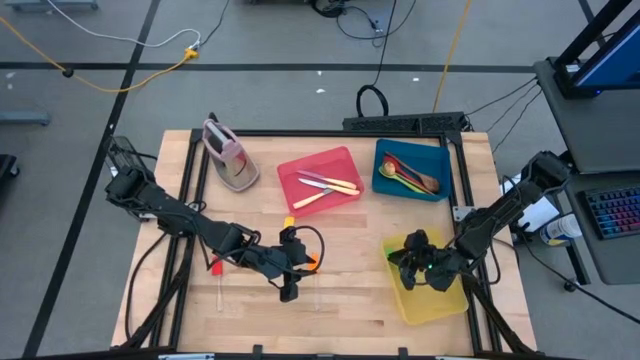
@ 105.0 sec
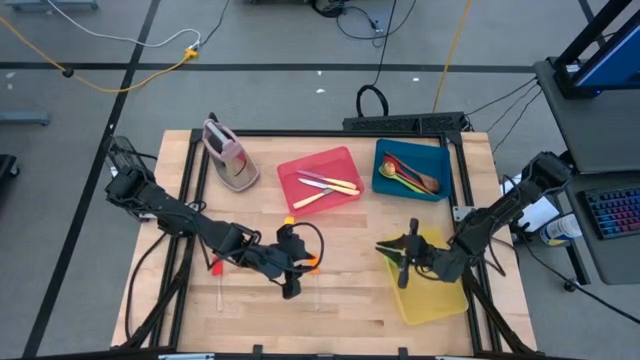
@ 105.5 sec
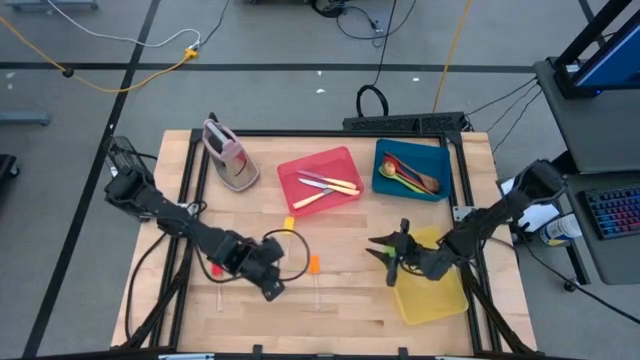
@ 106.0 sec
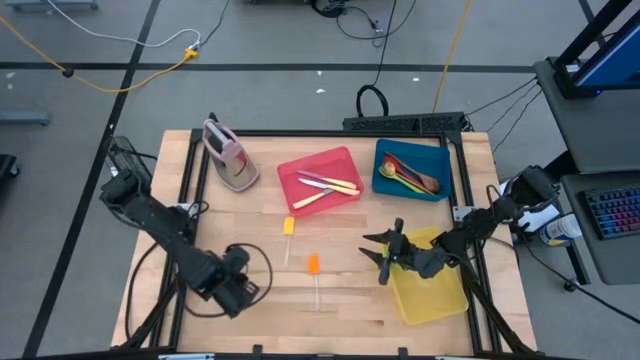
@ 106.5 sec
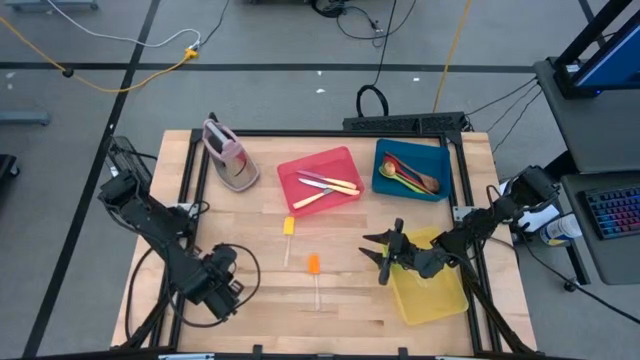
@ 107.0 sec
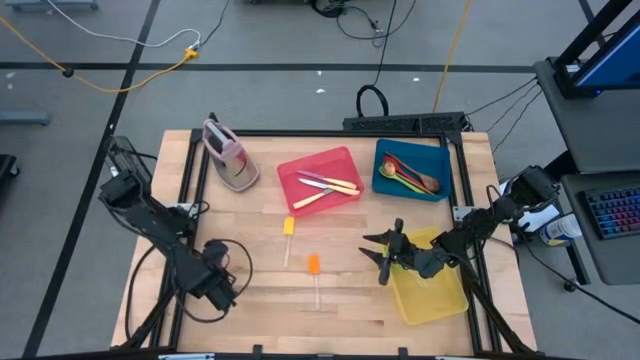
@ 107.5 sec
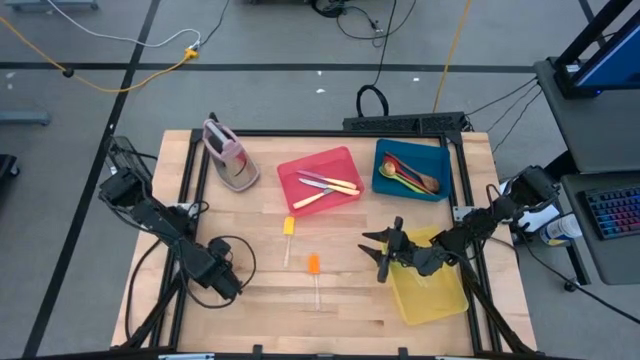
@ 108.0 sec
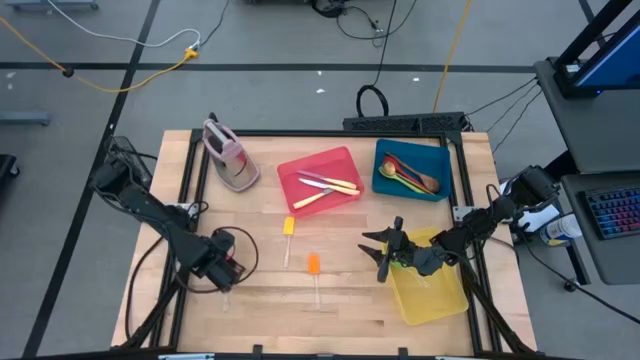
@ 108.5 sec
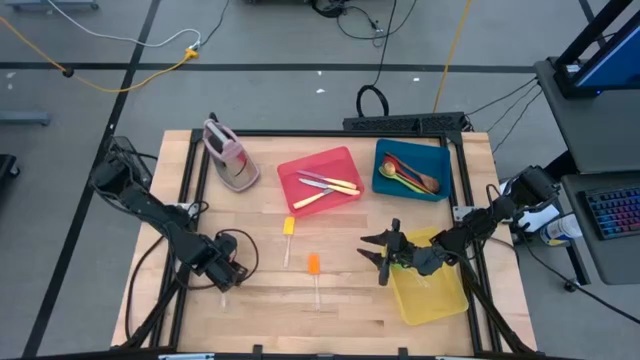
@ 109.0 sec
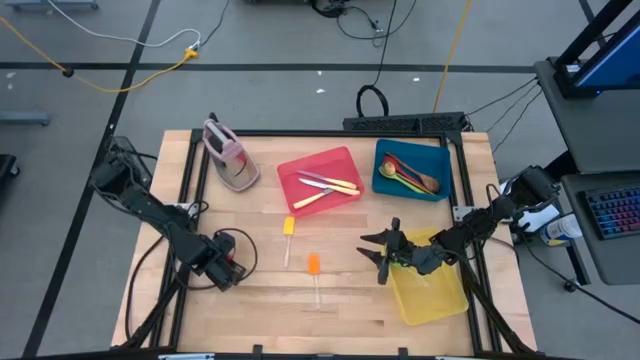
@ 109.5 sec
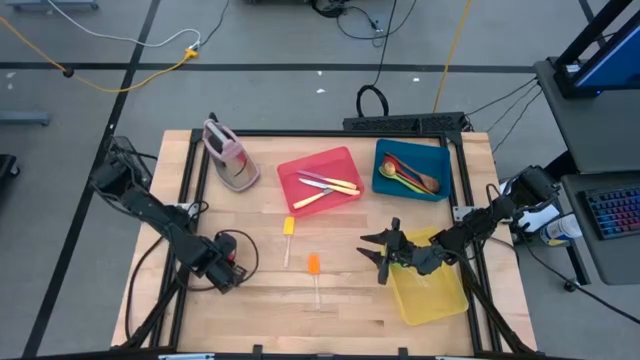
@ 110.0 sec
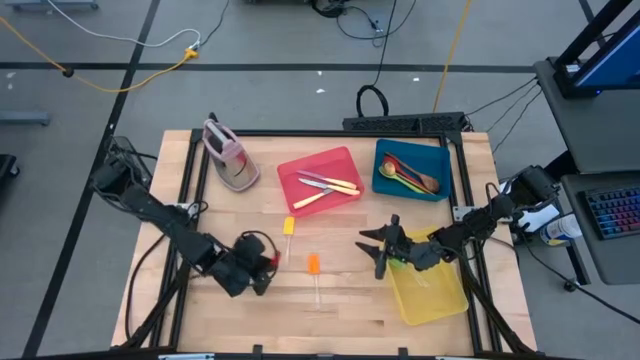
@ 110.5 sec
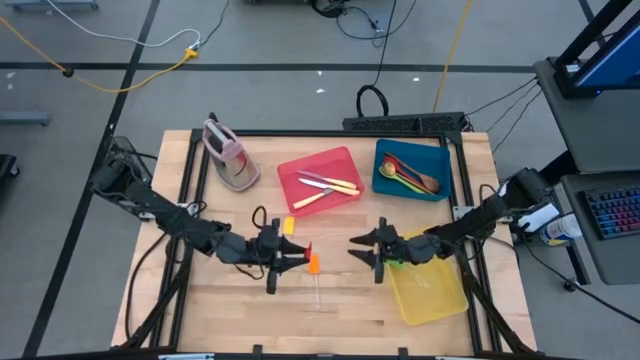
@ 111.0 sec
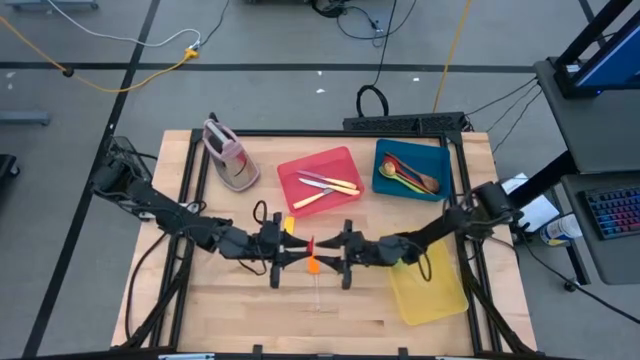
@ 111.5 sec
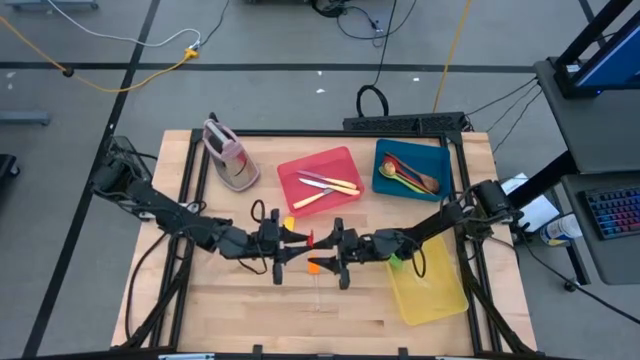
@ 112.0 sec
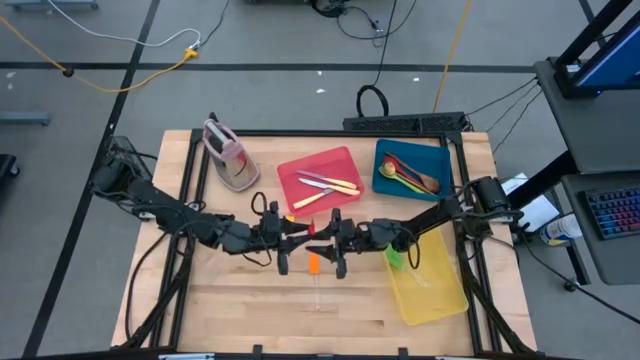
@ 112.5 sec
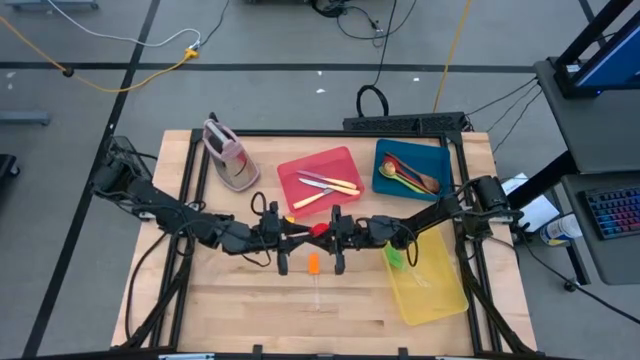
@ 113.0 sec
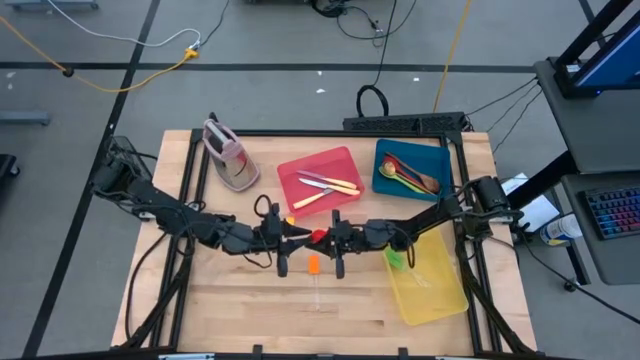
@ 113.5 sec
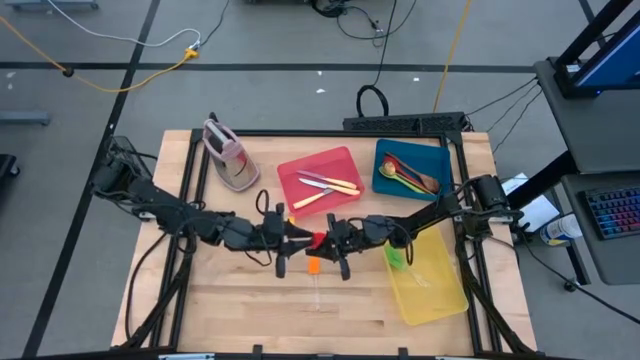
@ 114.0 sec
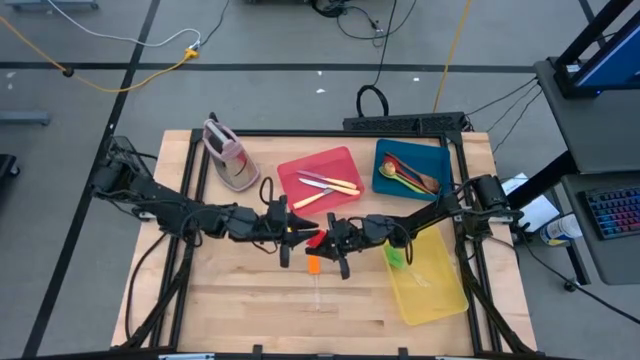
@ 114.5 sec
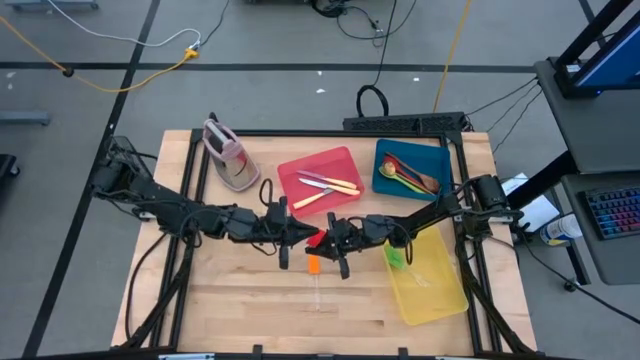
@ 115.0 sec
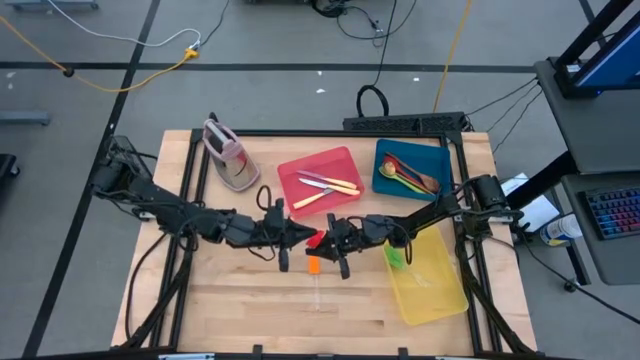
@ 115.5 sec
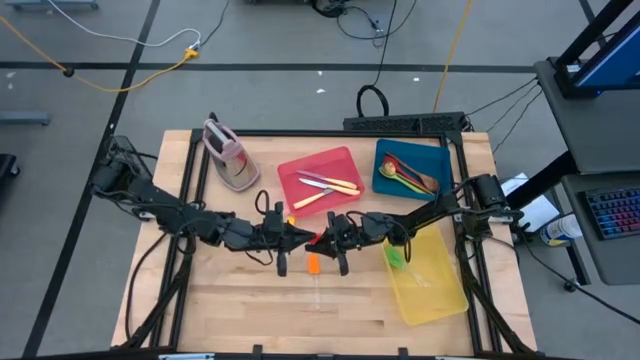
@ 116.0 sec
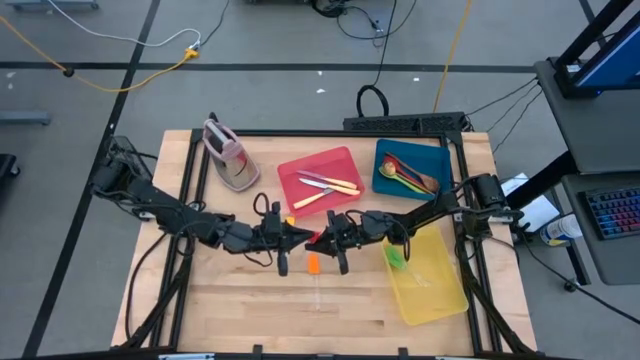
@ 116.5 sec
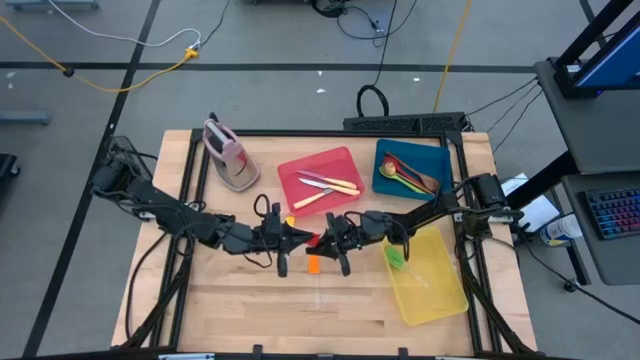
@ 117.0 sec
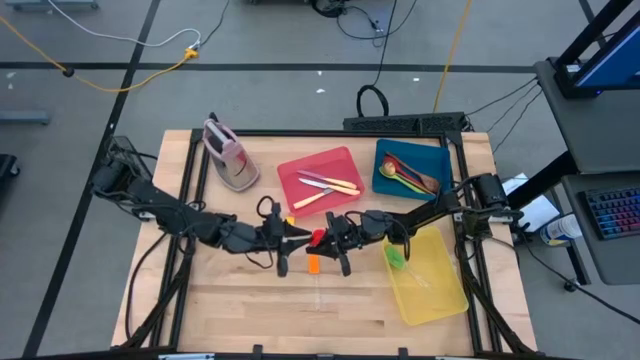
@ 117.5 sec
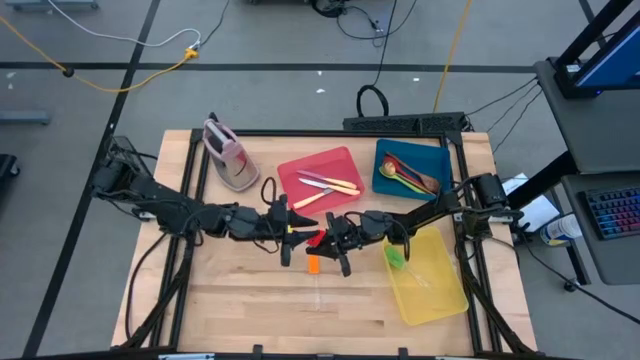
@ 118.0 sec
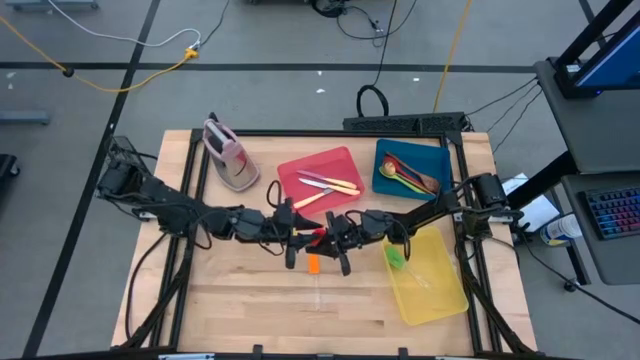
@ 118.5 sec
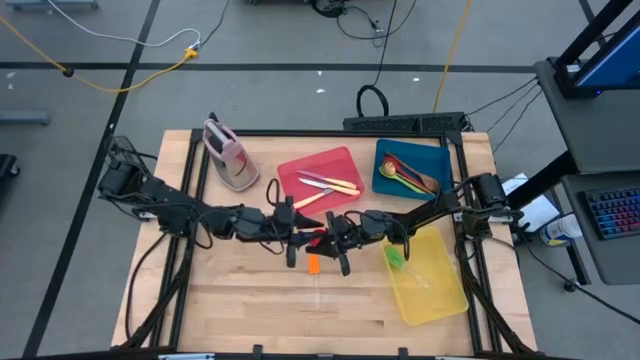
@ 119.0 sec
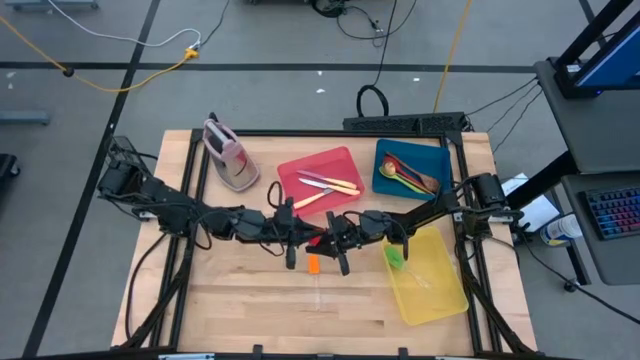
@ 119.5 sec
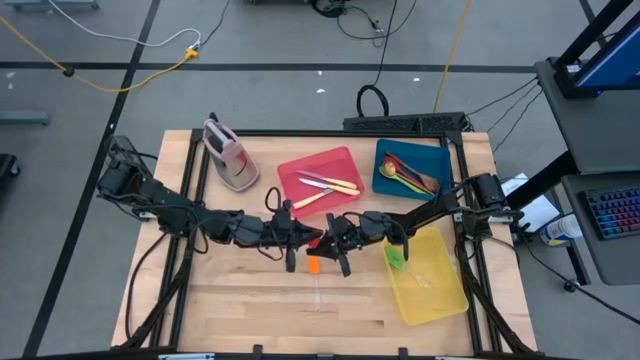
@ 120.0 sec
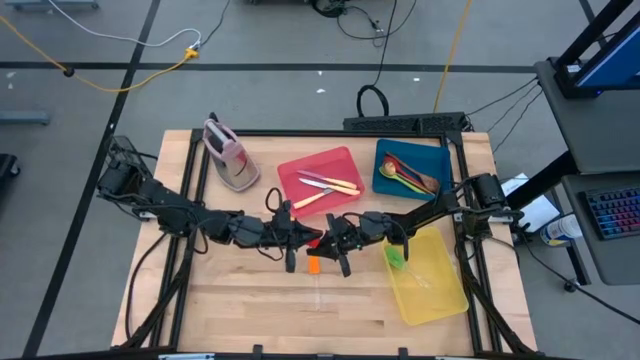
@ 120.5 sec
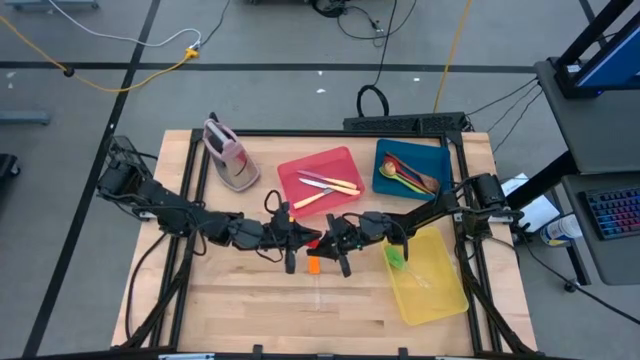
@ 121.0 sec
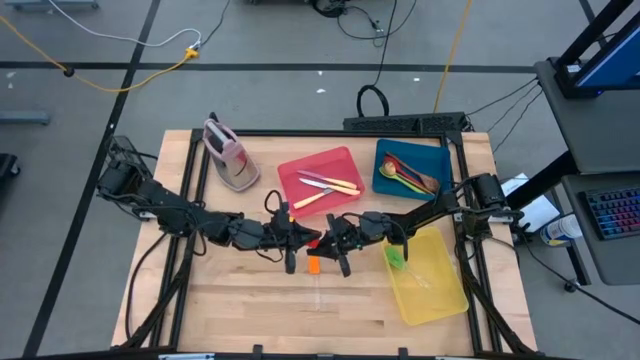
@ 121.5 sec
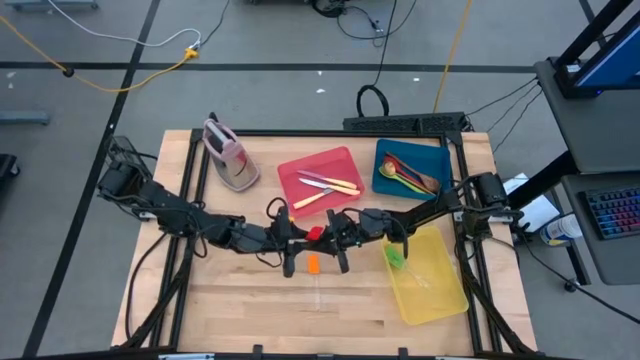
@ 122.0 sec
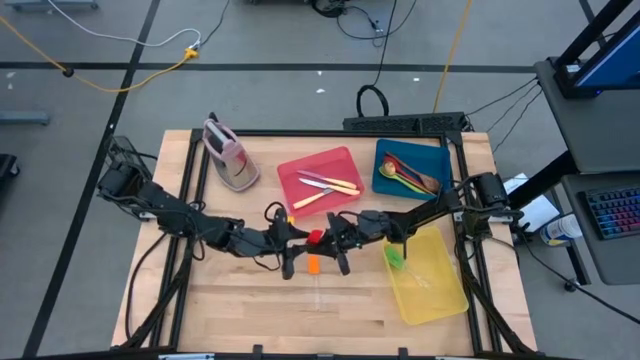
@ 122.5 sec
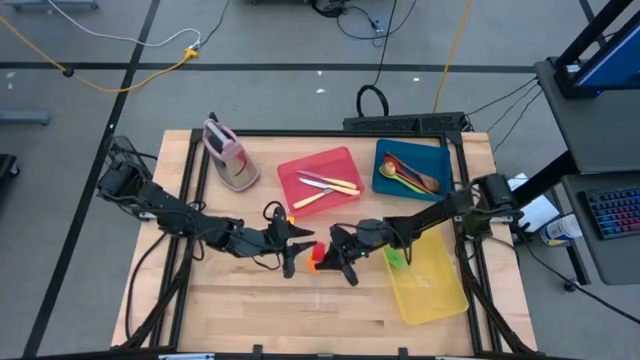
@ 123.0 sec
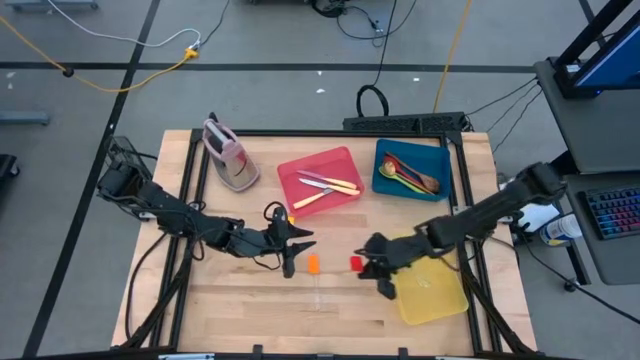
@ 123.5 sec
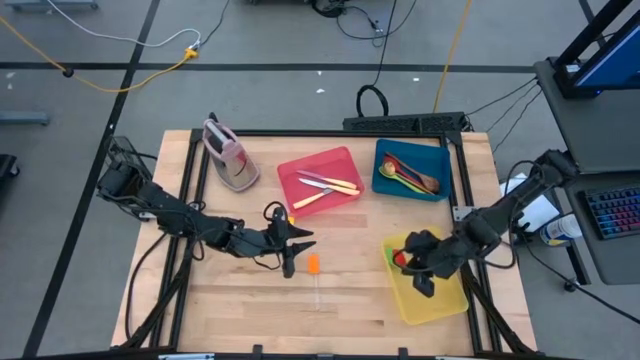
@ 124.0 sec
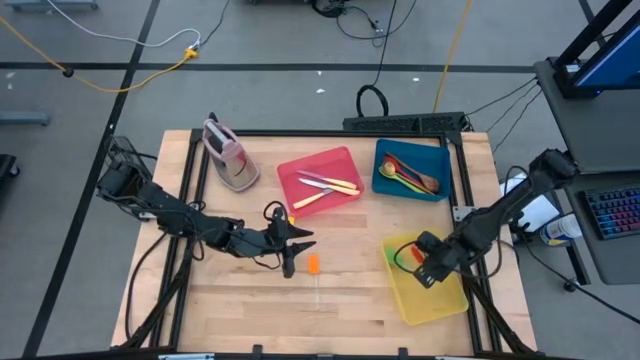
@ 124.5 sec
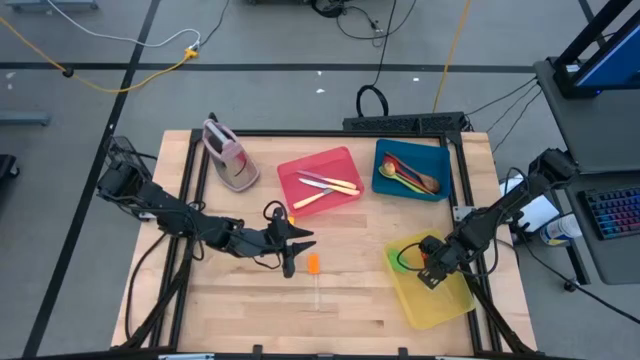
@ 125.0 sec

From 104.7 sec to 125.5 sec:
Task: Pick & Place Kitchen Items
Put the red spatula into the yellow bin
